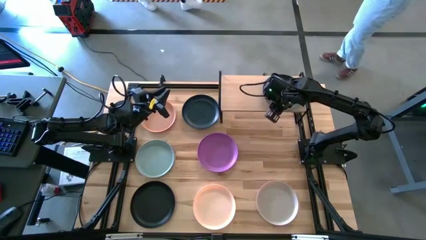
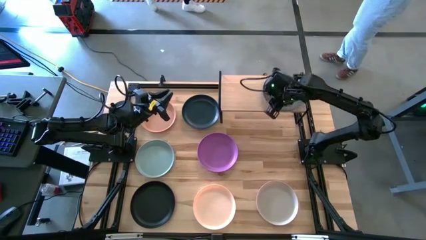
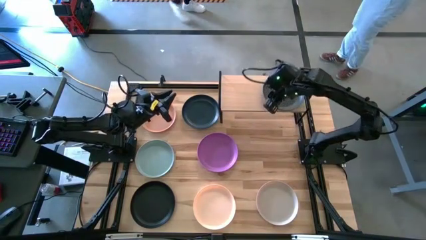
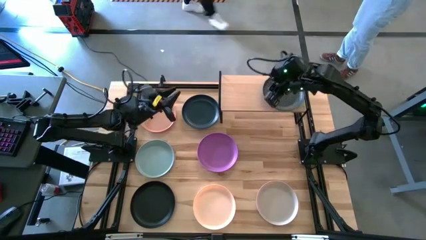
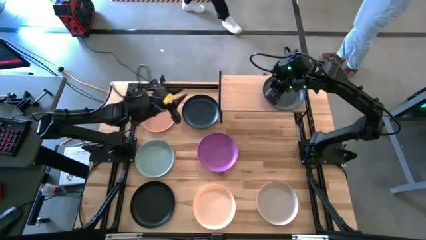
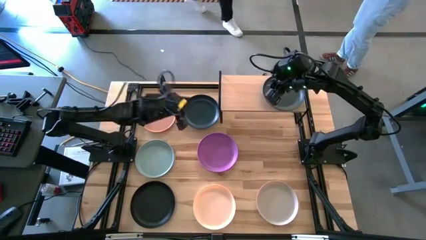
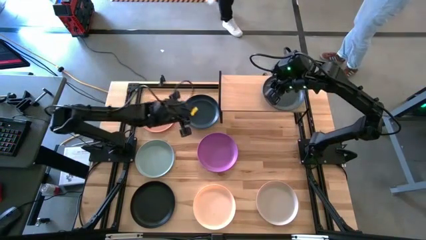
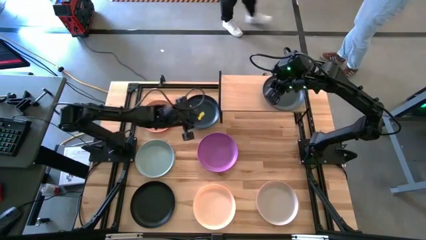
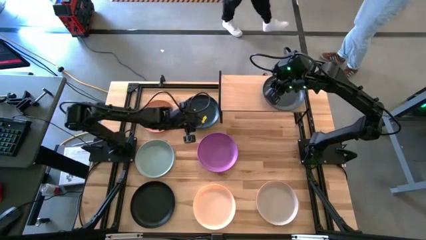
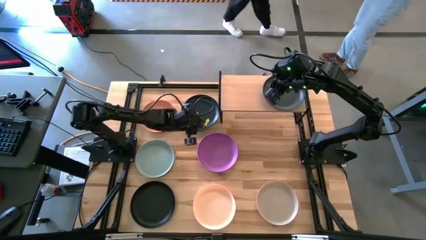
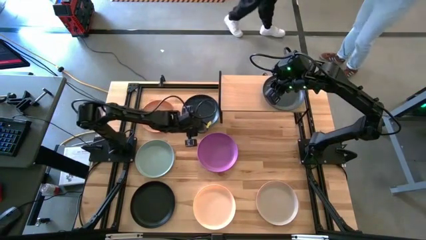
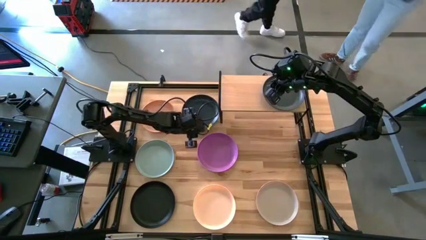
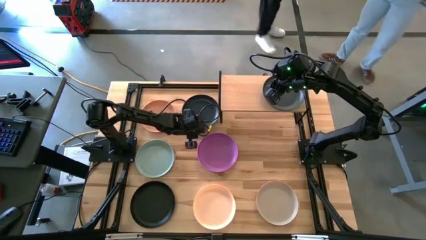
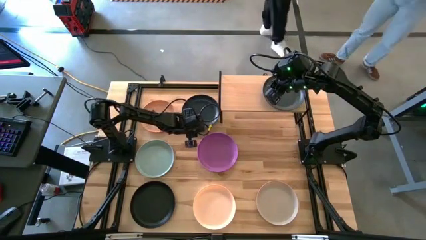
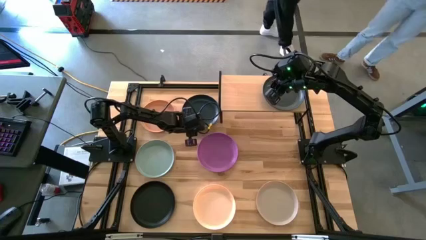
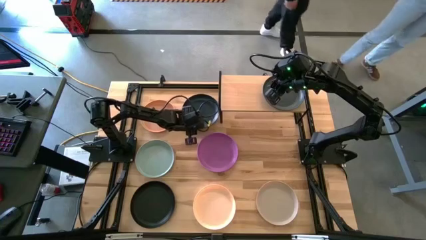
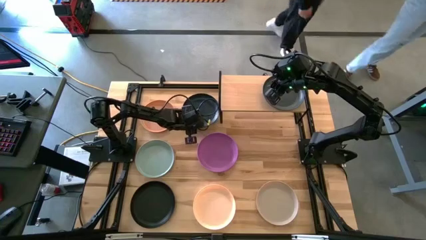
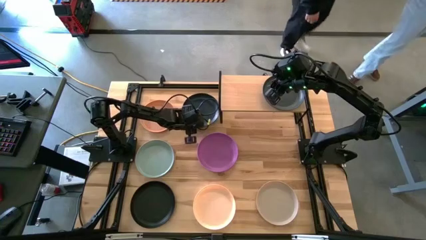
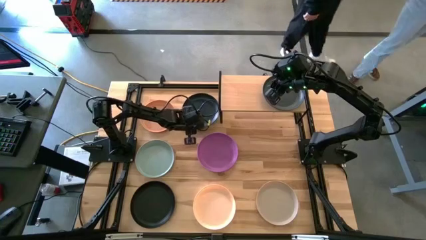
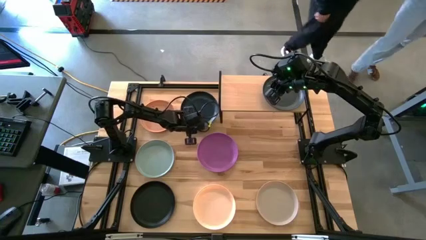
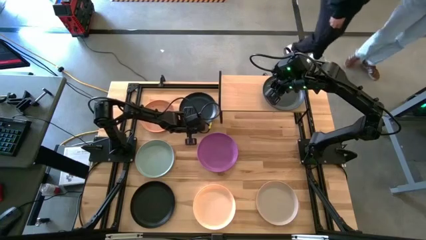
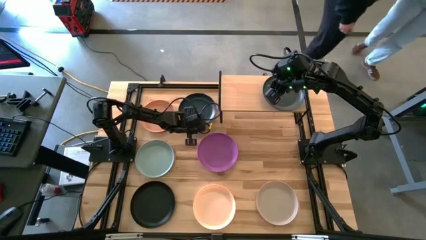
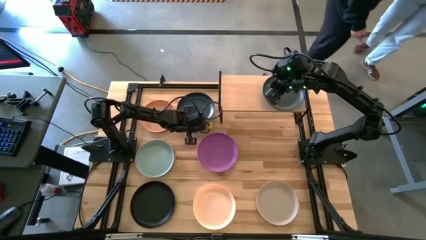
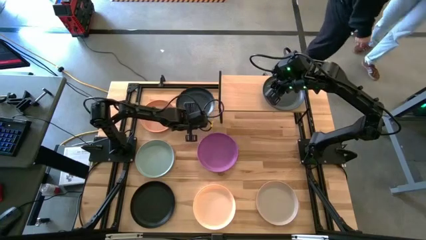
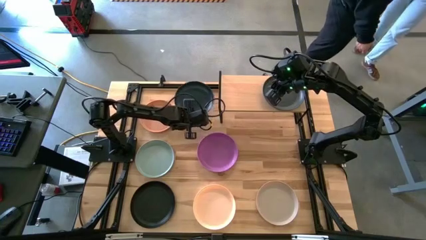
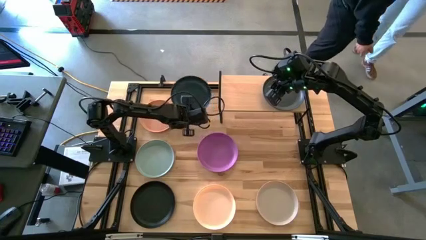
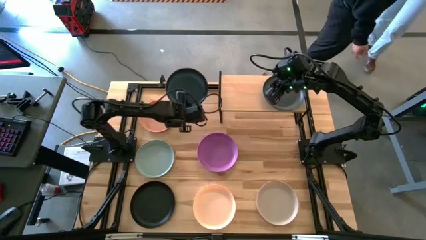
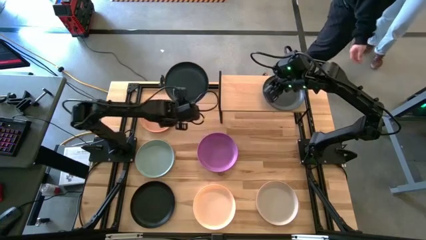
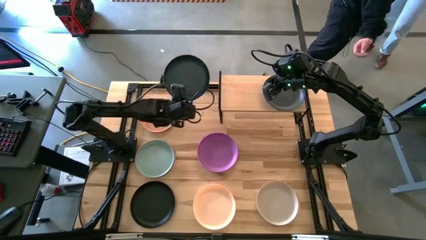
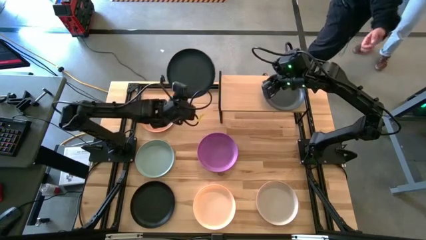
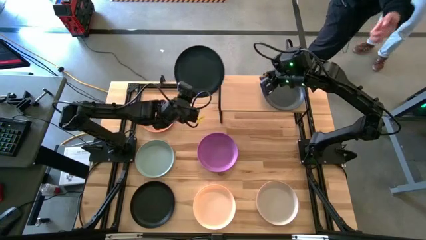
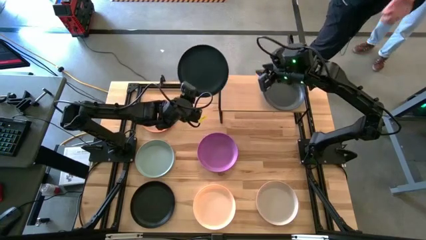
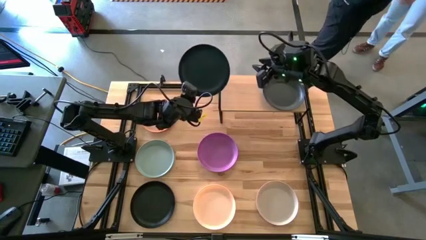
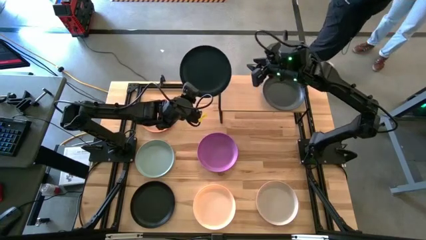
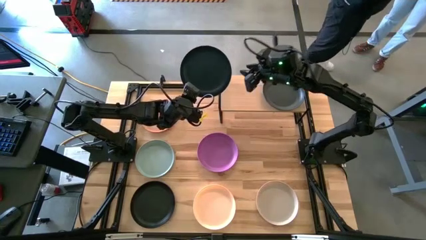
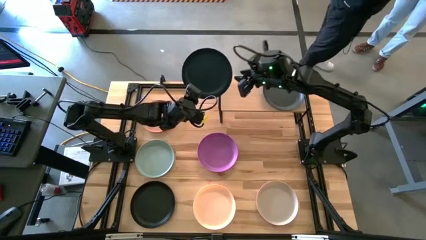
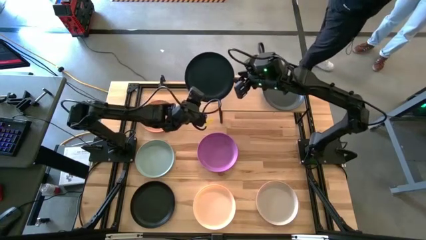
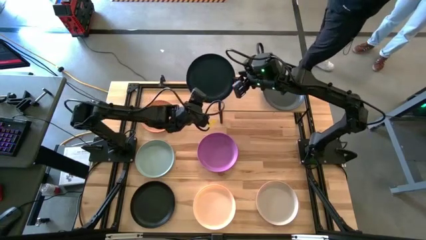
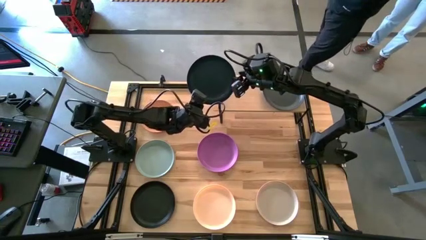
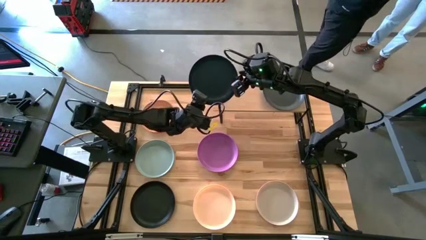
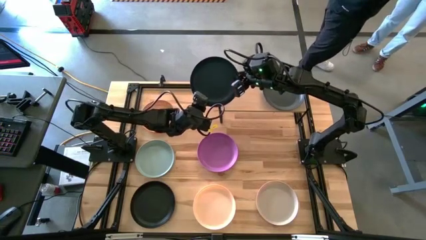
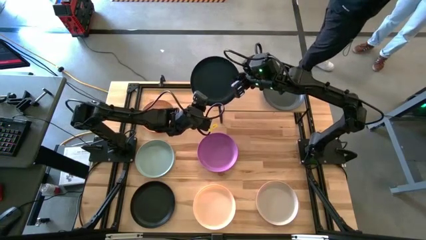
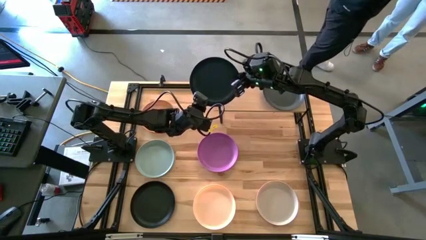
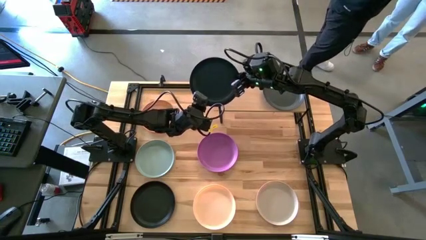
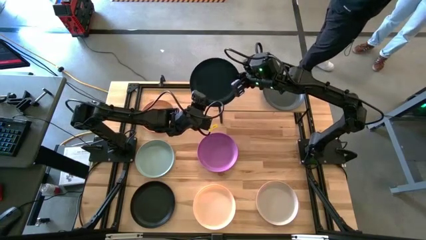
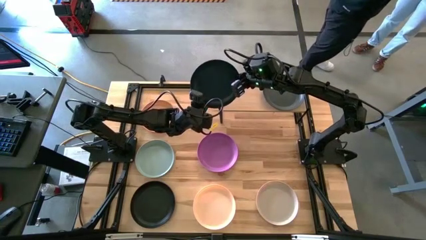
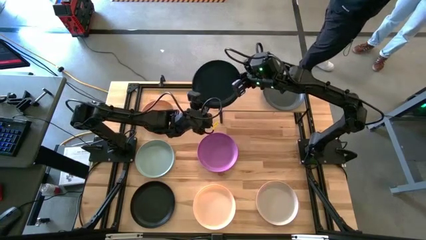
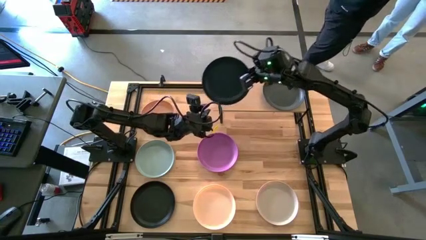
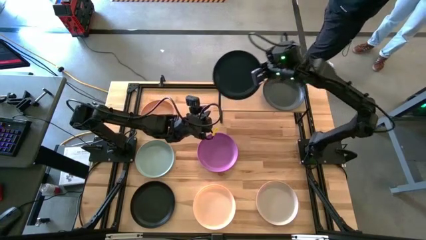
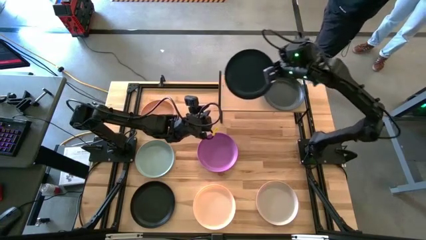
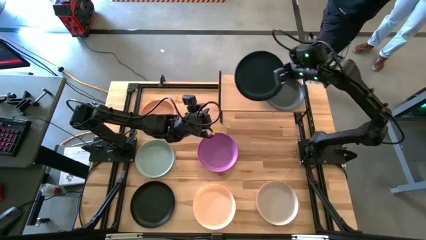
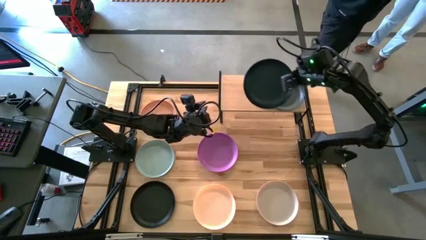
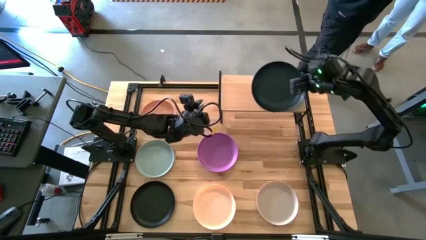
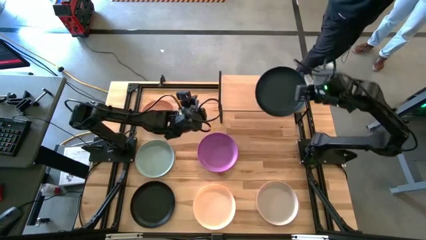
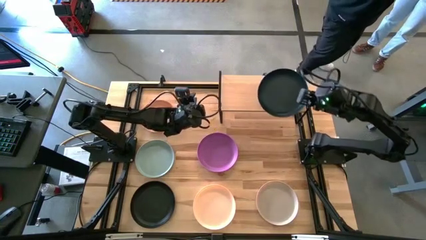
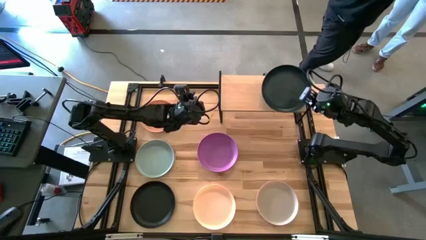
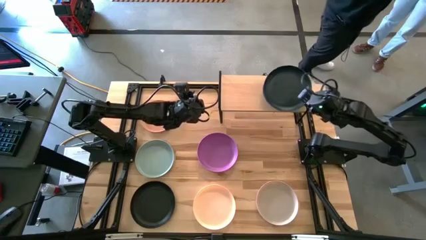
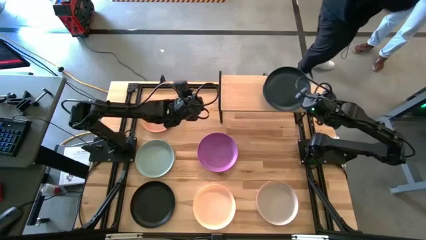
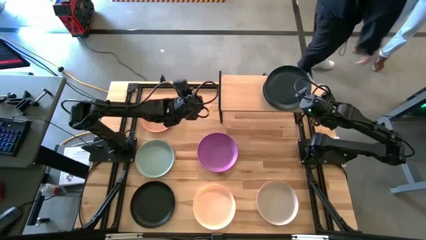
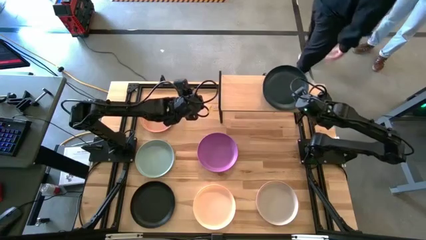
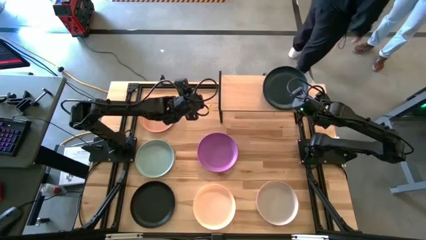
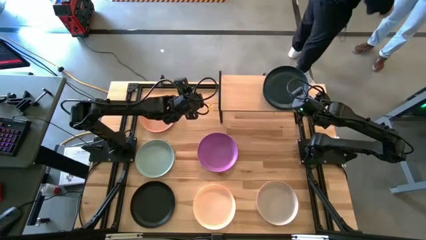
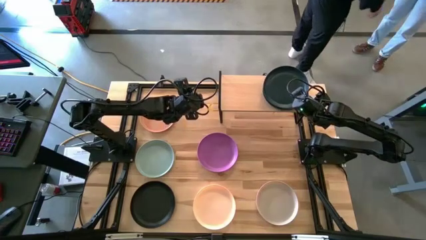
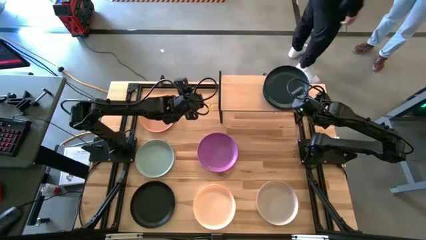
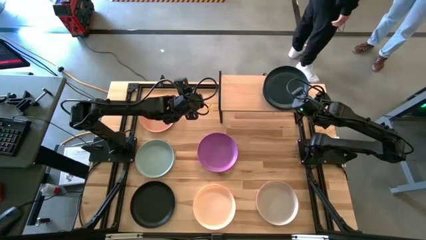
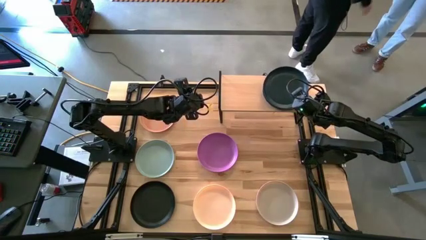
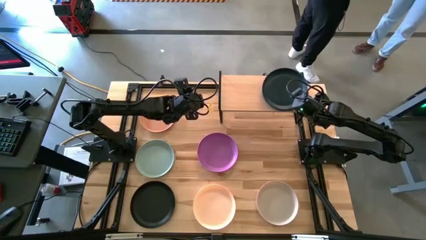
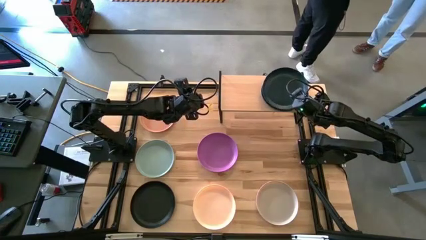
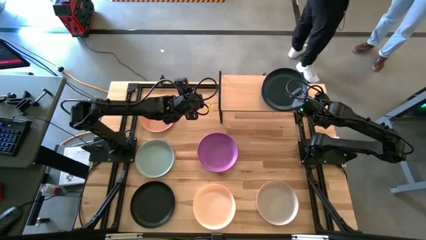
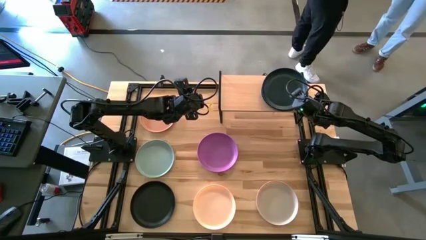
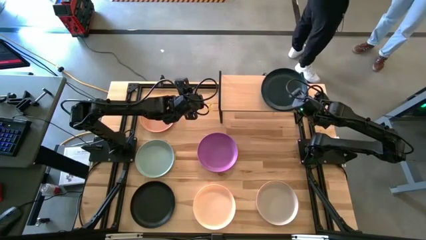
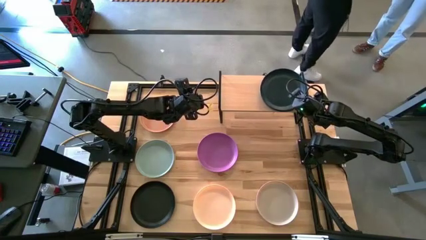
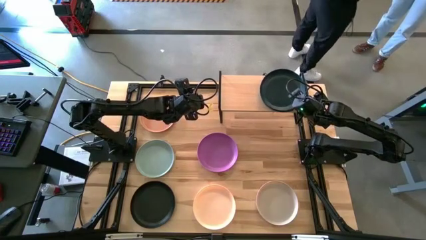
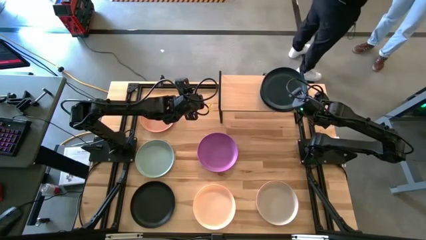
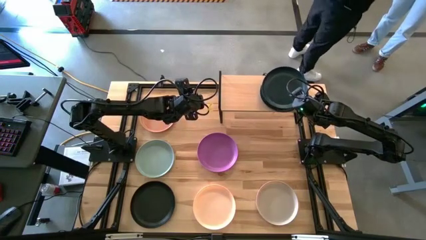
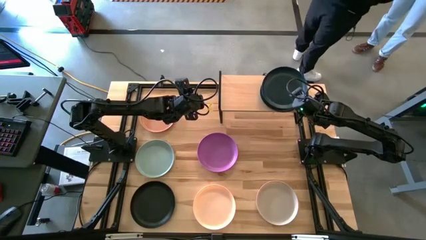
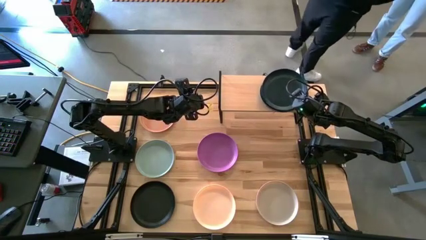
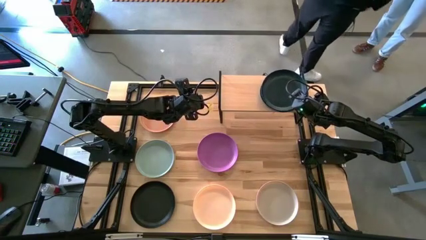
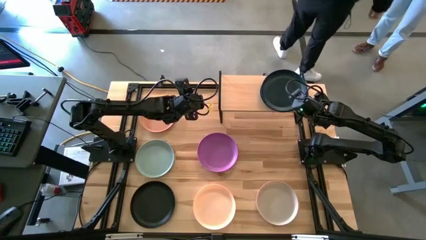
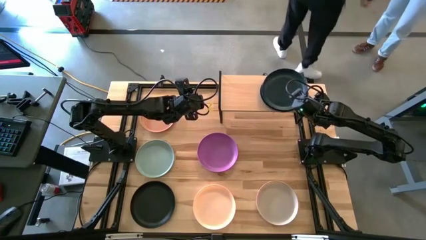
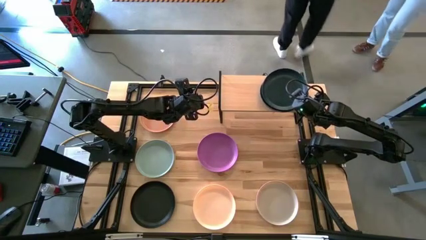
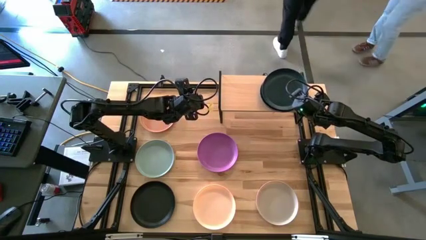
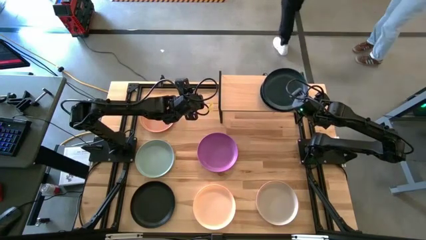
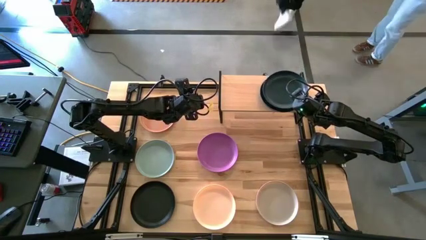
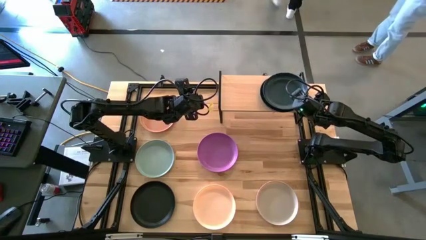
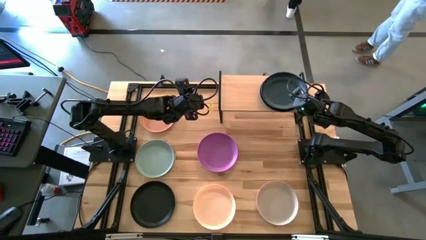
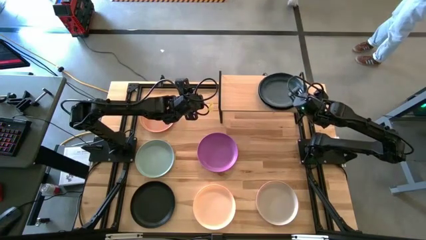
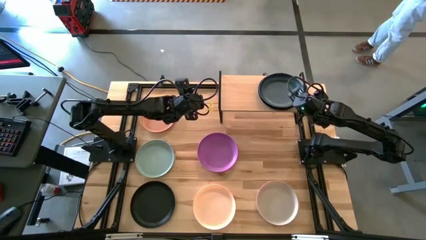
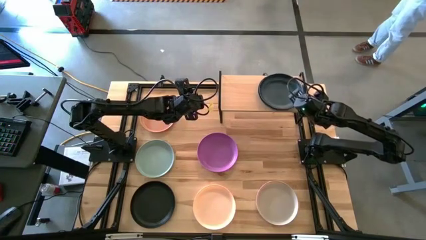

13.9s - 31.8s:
Task: Place and stack plates onto a shelf
Stack the top black plate on top of the black plate on the shelf
